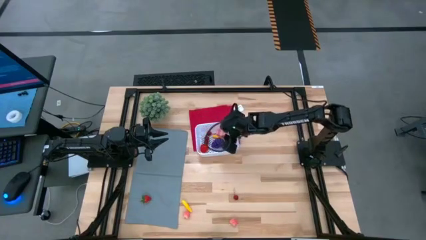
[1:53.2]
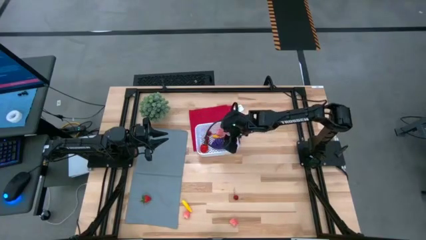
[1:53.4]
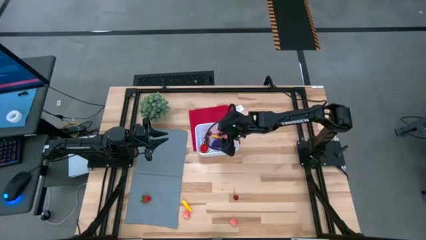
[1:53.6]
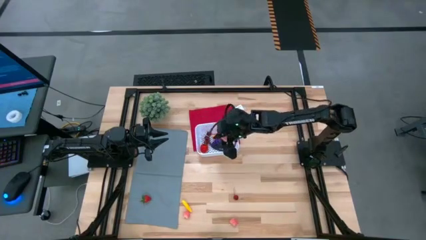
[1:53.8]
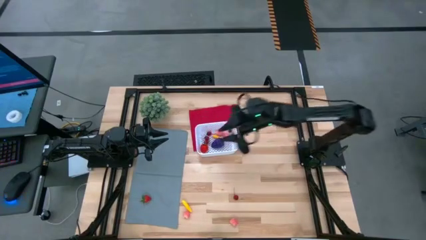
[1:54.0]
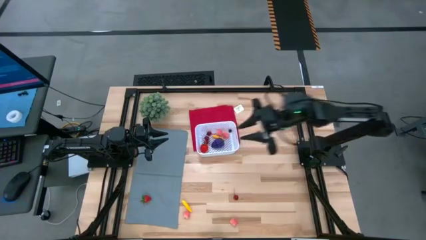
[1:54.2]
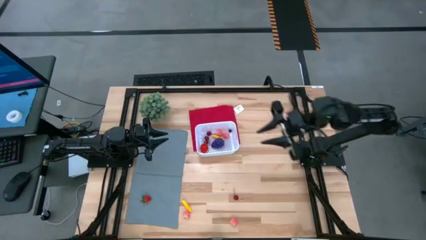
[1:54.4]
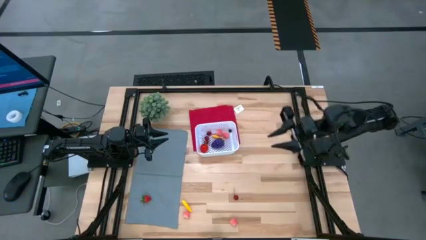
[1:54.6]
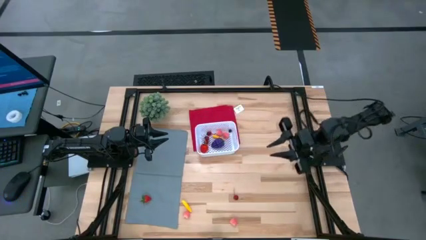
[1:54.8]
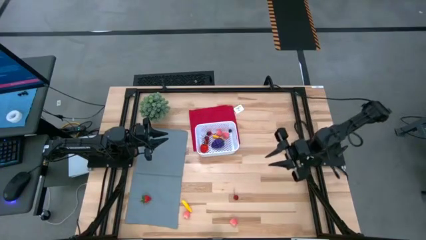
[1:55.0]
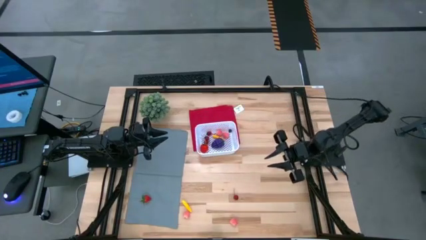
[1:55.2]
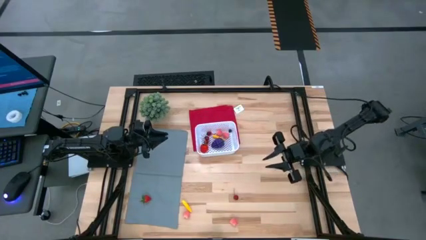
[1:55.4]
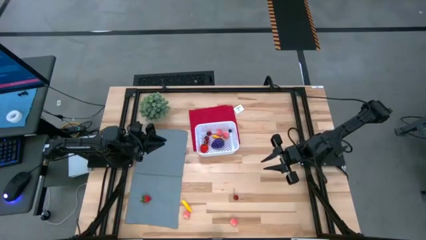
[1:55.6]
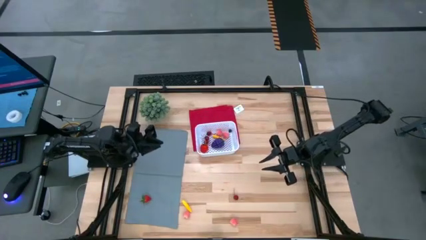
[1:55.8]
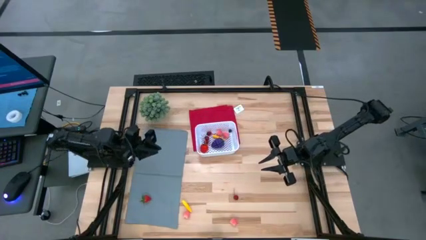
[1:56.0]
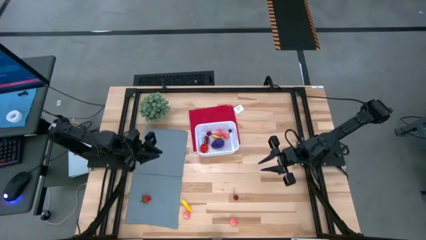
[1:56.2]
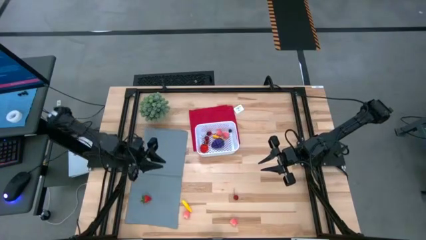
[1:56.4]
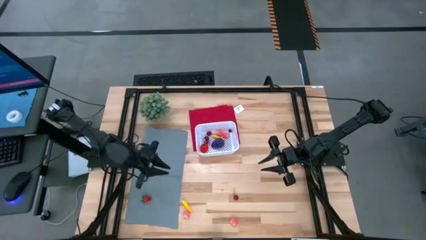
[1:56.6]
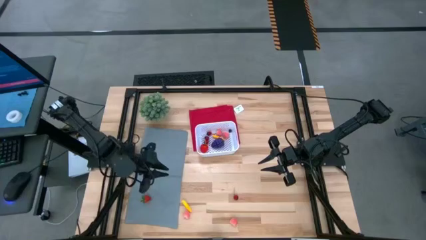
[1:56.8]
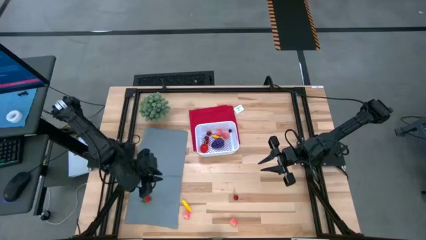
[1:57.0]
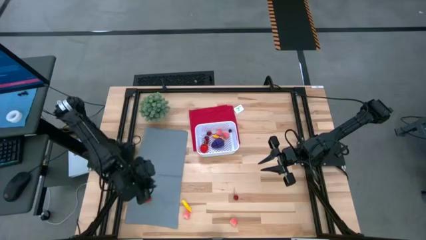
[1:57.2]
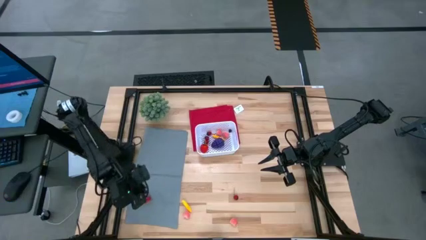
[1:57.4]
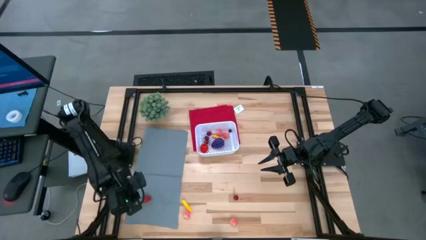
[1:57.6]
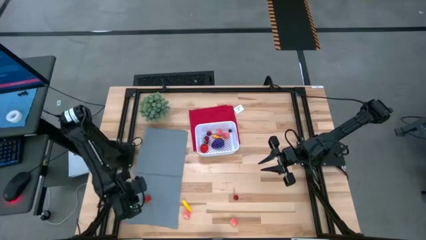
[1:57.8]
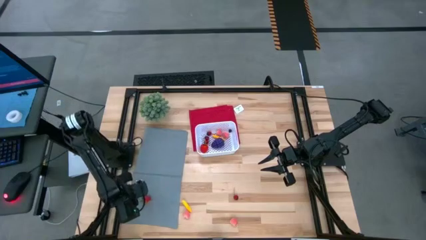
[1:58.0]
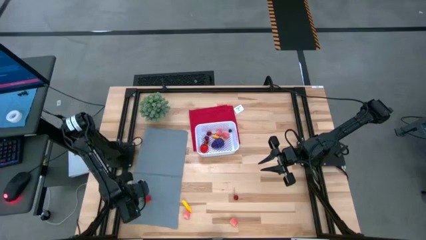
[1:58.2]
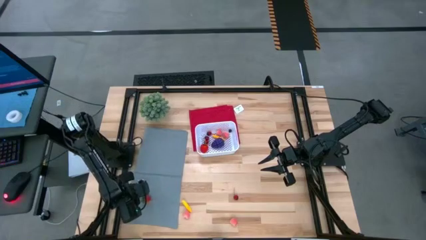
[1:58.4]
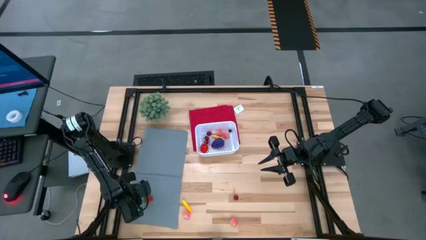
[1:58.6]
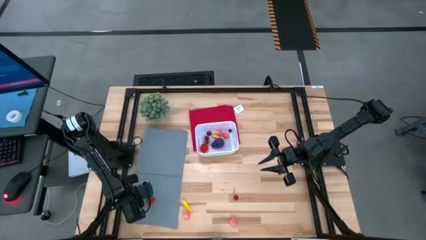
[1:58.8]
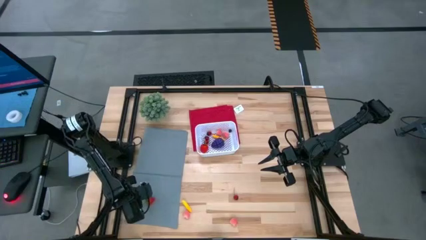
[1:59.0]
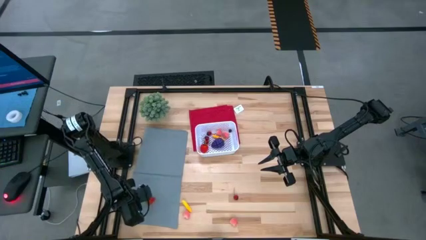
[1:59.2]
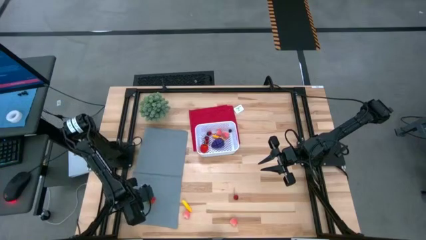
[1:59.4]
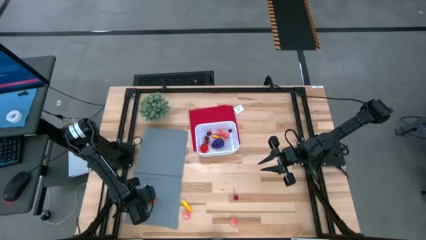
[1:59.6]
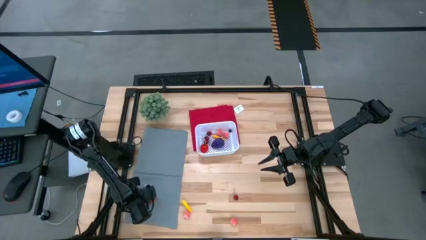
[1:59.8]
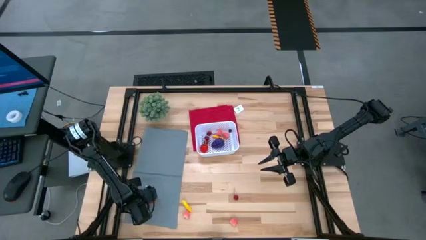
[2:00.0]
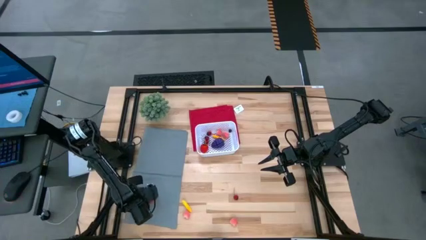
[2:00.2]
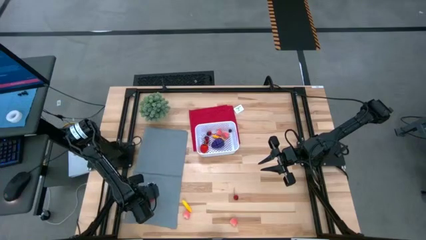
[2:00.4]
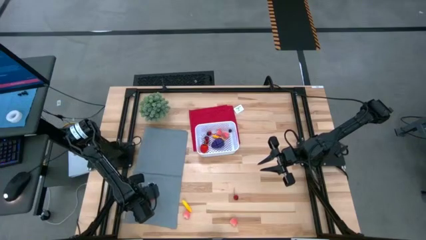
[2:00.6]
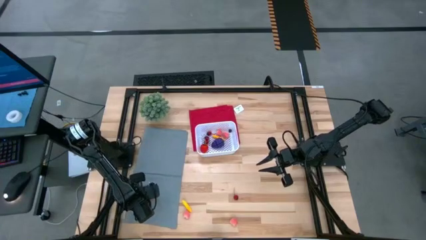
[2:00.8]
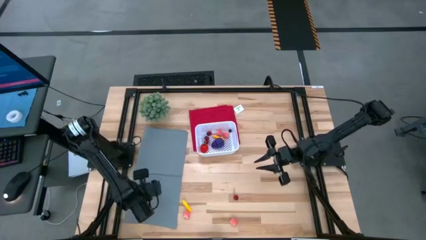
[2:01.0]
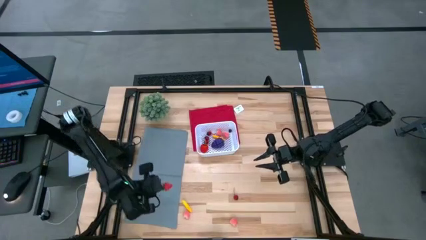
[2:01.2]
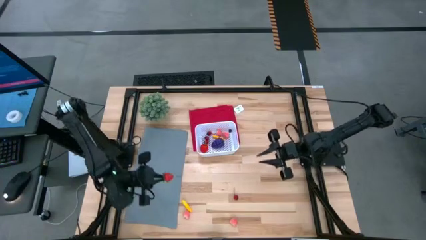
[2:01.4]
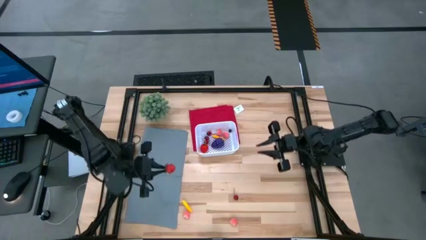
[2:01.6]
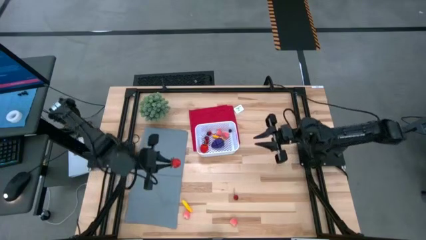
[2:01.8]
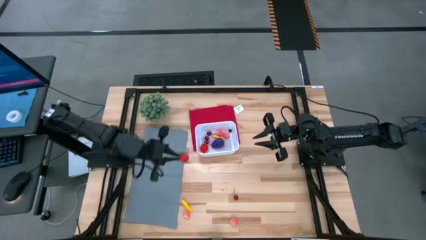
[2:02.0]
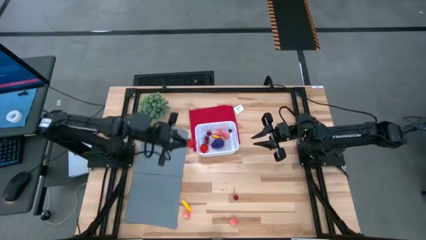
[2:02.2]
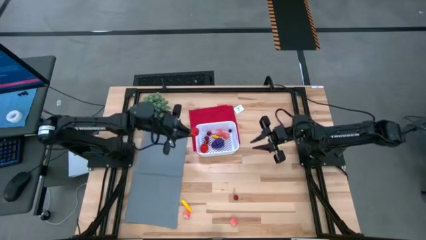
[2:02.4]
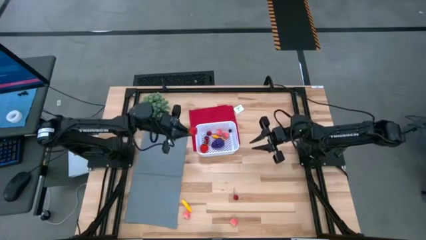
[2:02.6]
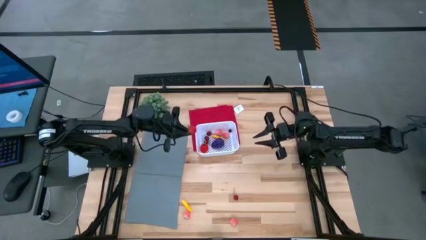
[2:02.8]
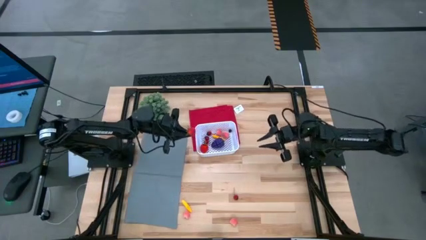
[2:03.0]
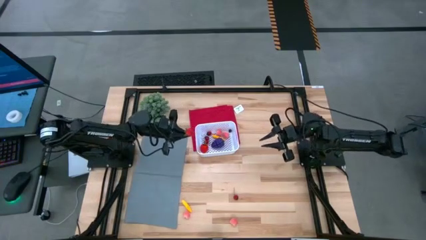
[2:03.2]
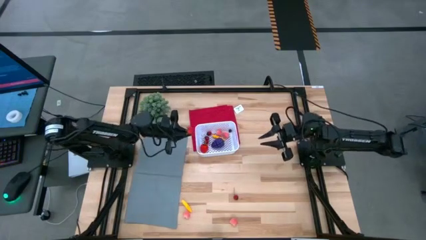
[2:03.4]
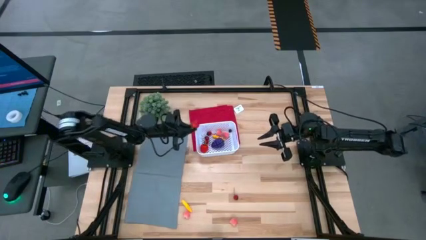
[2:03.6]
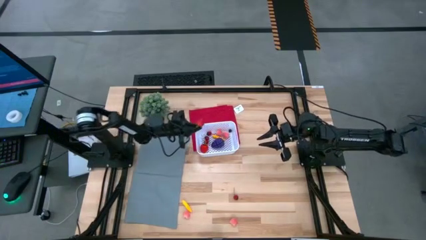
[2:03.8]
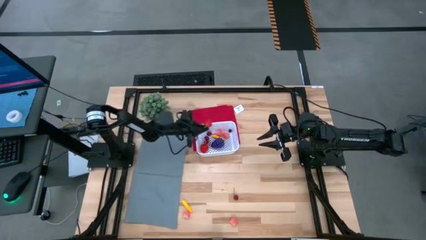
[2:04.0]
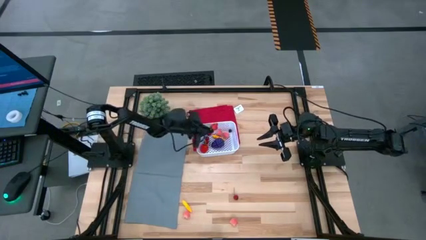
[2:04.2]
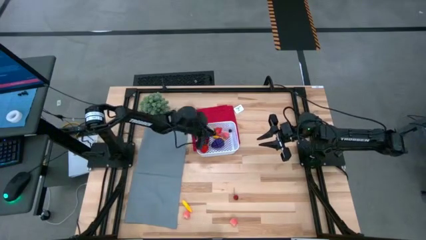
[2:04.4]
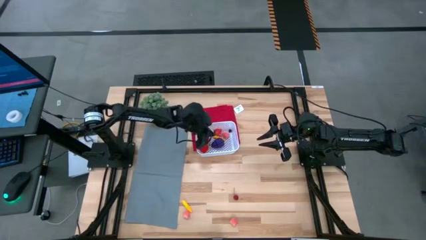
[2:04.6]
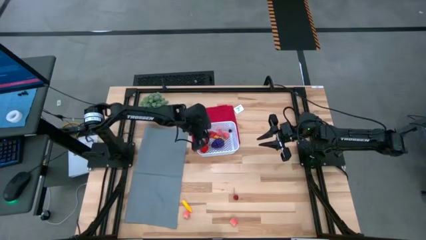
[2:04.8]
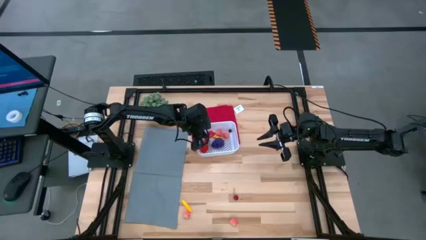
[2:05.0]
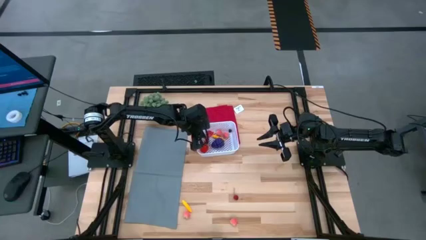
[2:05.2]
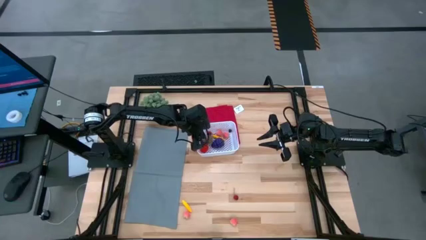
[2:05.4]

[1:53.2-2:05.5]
Task: Pick and placing Produce into tupperware
Put the red strawberry into the white bin
